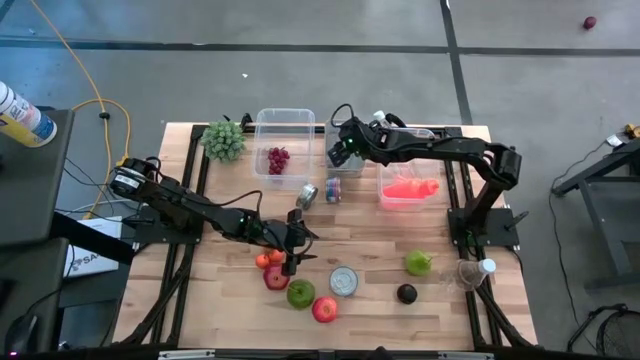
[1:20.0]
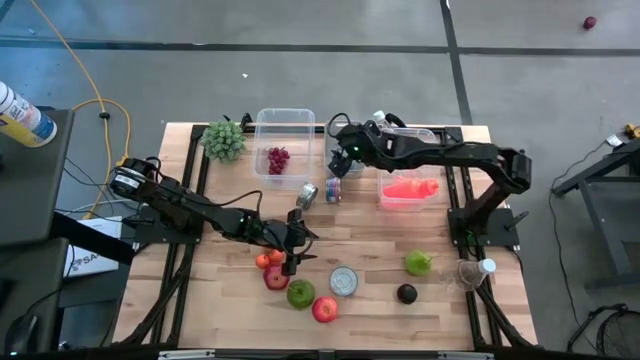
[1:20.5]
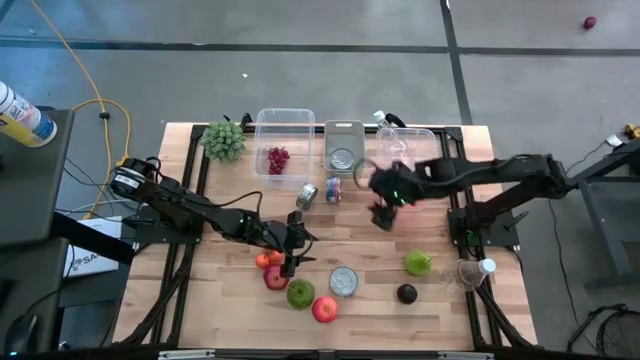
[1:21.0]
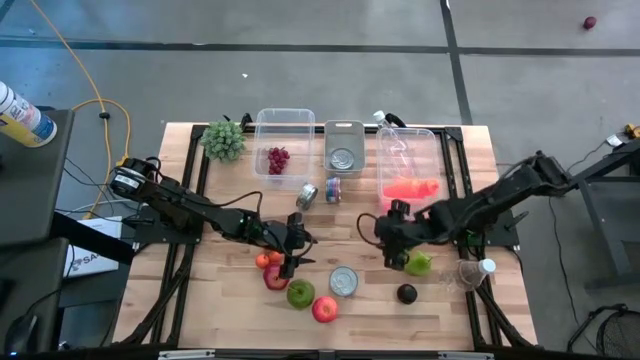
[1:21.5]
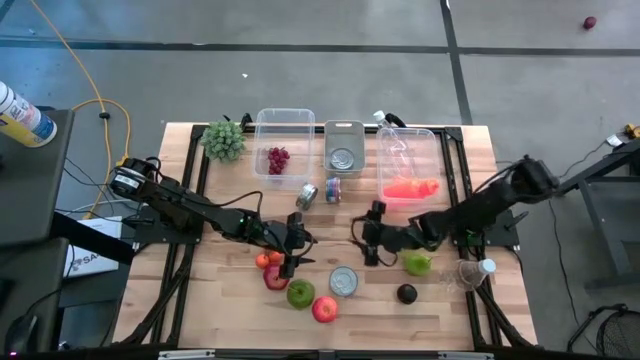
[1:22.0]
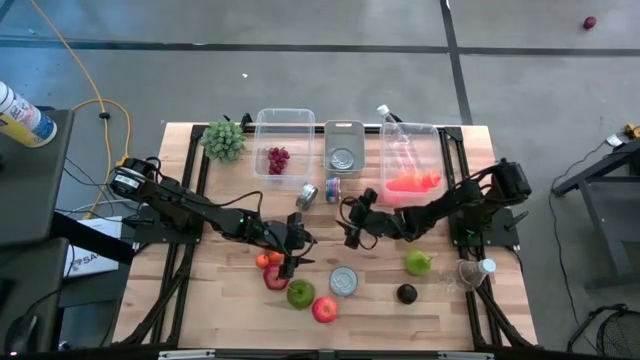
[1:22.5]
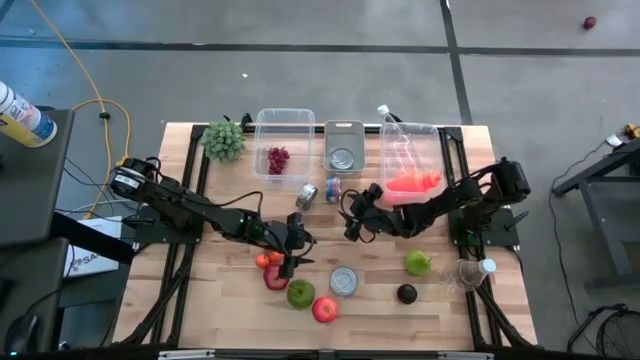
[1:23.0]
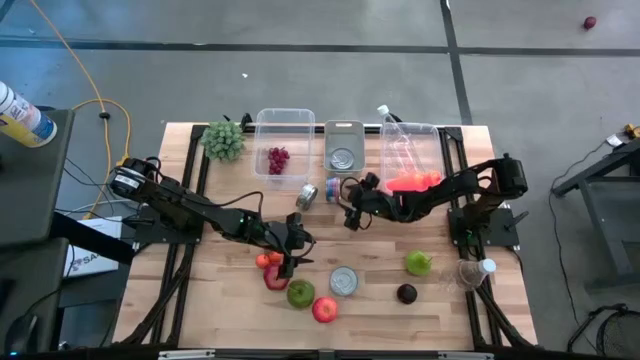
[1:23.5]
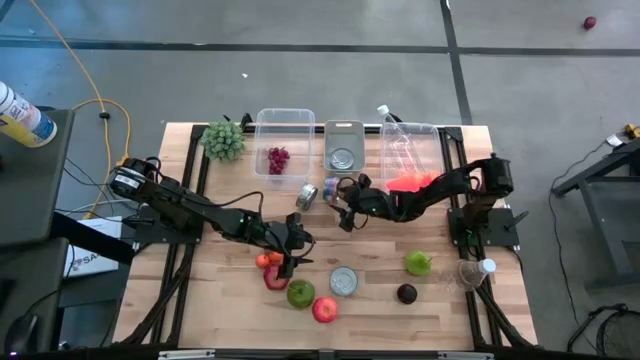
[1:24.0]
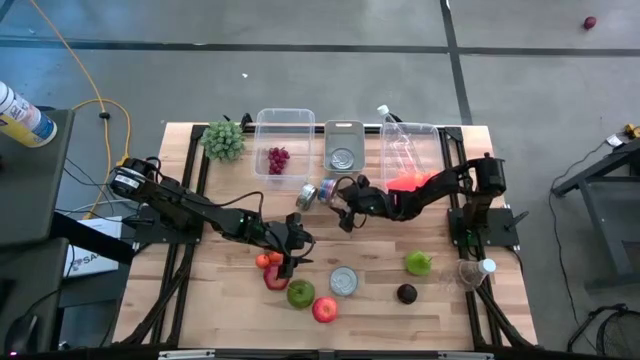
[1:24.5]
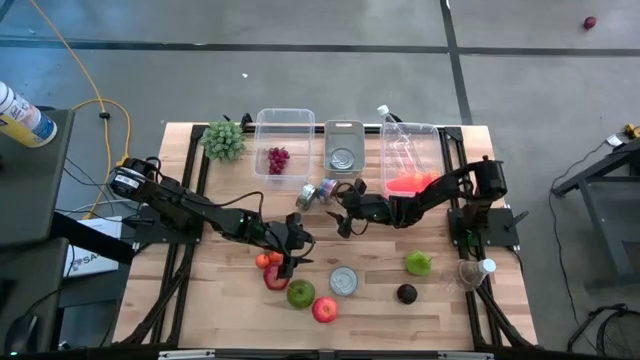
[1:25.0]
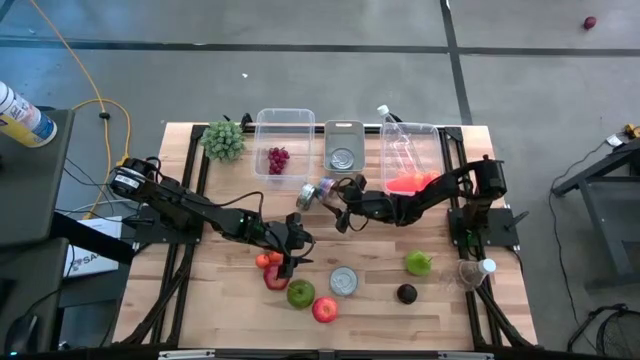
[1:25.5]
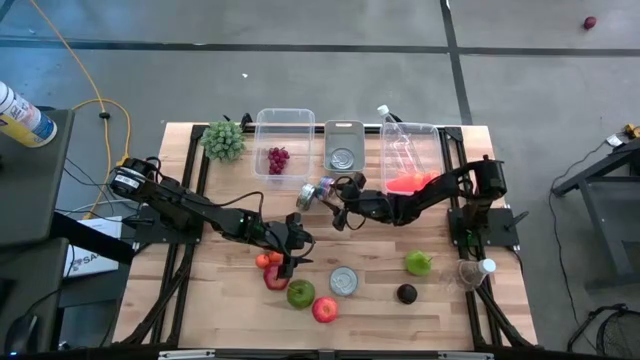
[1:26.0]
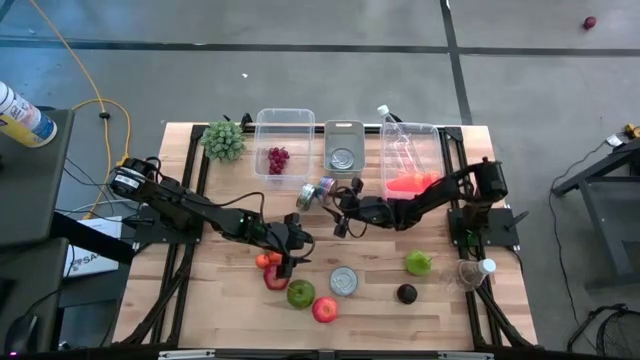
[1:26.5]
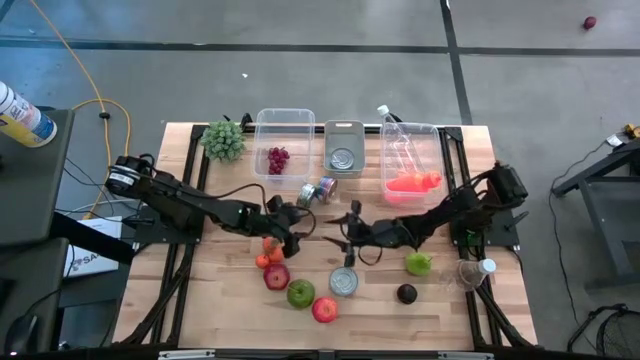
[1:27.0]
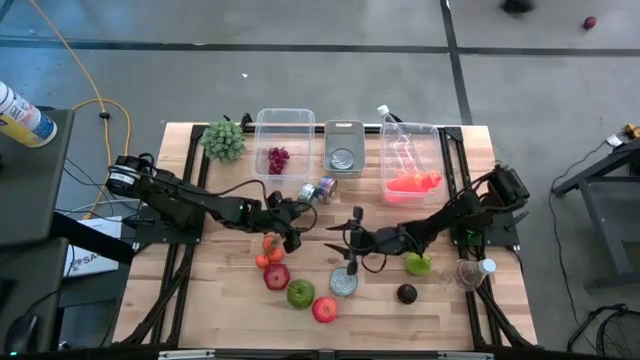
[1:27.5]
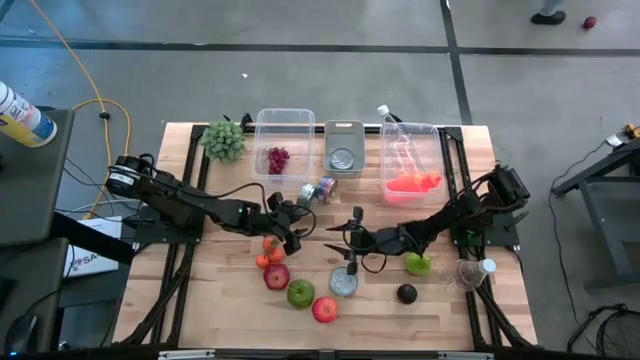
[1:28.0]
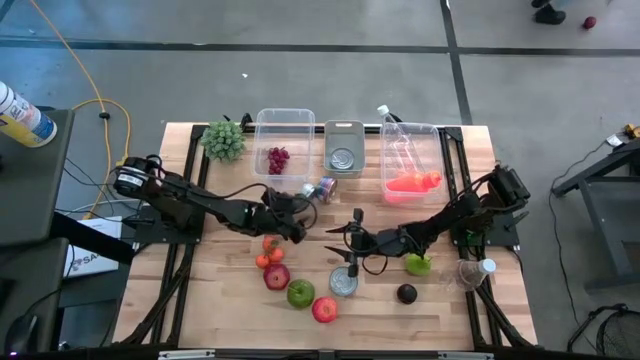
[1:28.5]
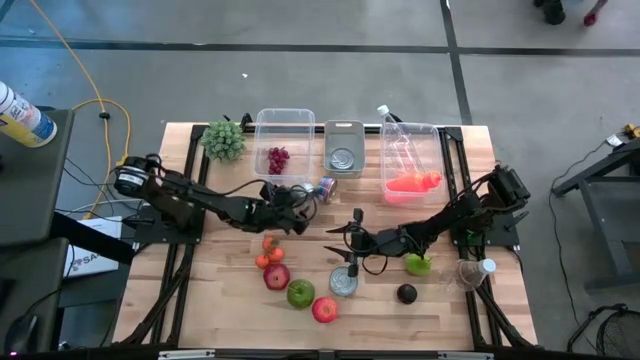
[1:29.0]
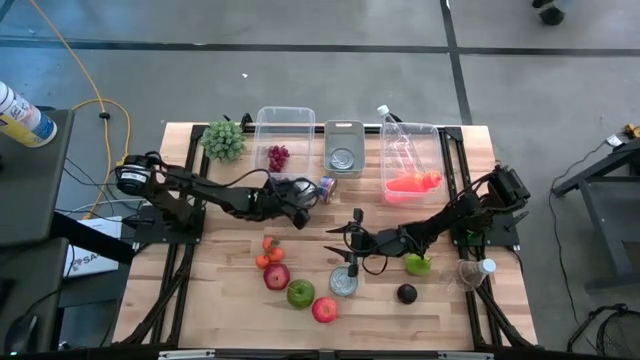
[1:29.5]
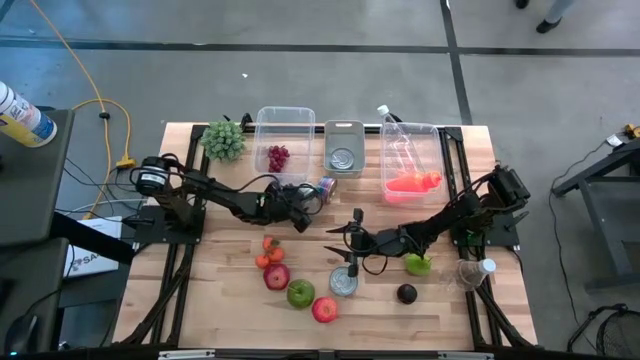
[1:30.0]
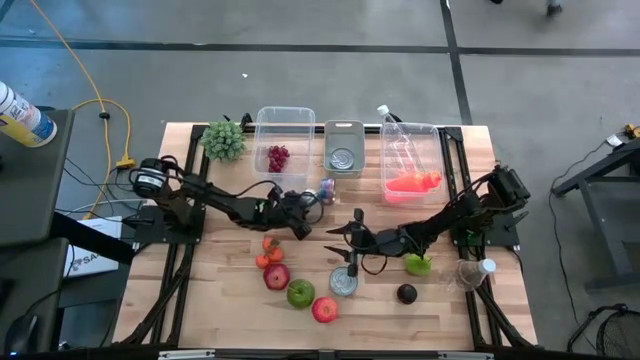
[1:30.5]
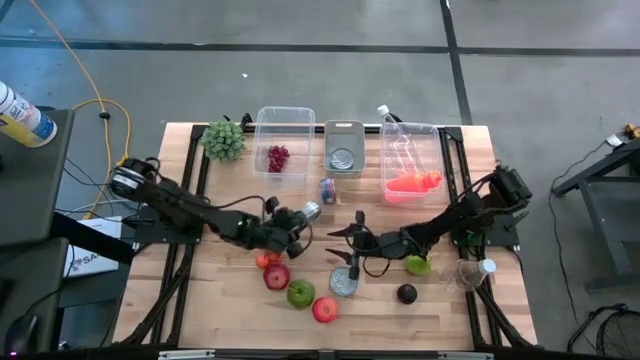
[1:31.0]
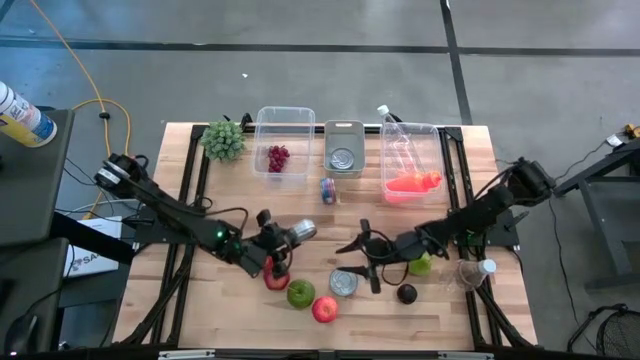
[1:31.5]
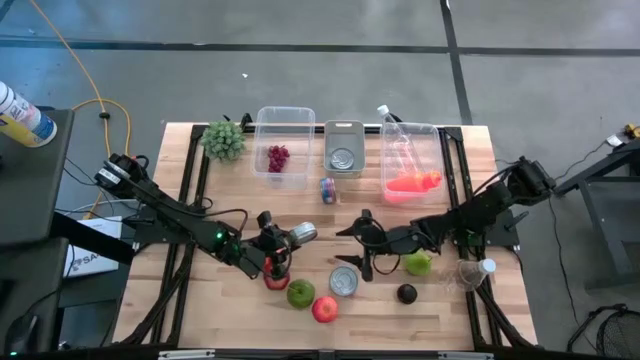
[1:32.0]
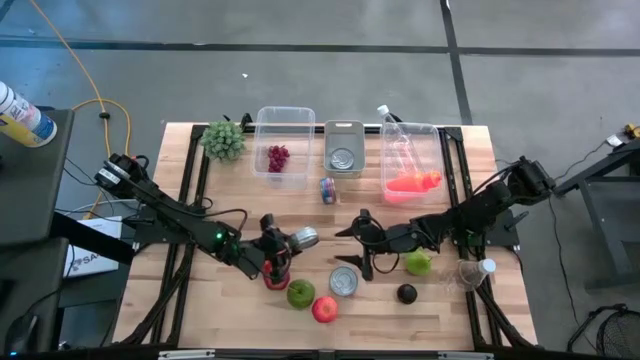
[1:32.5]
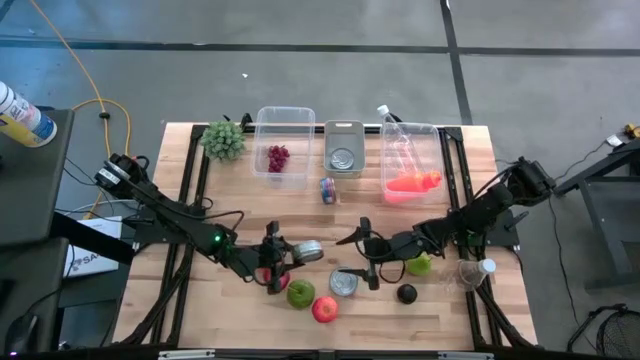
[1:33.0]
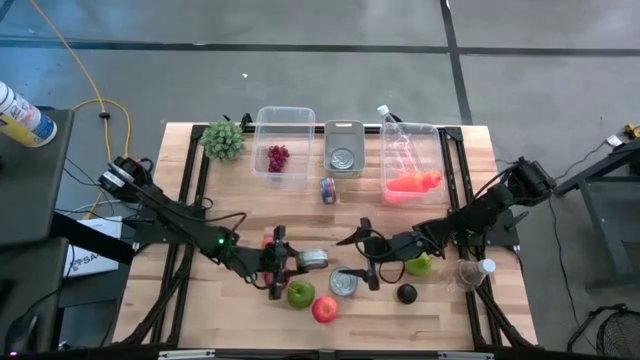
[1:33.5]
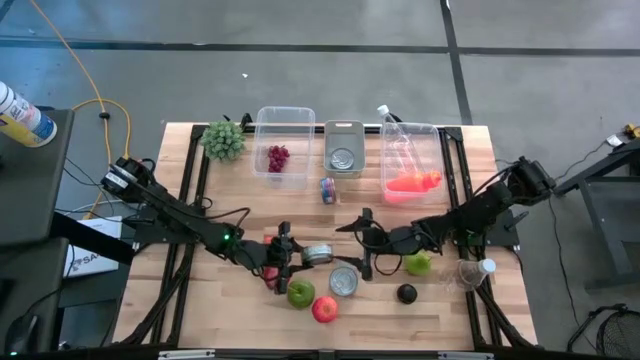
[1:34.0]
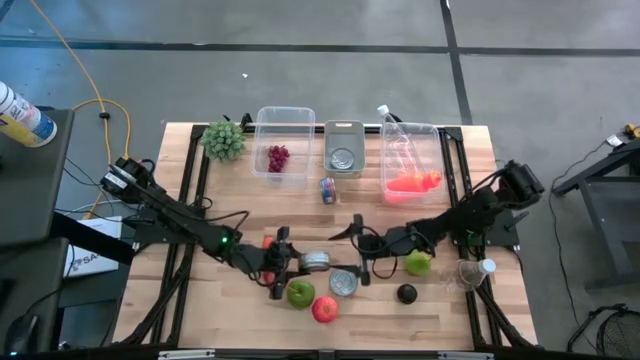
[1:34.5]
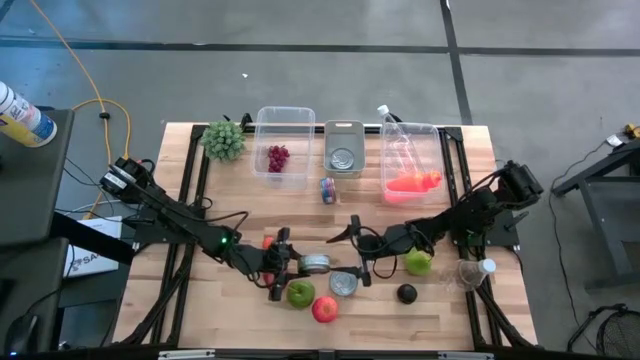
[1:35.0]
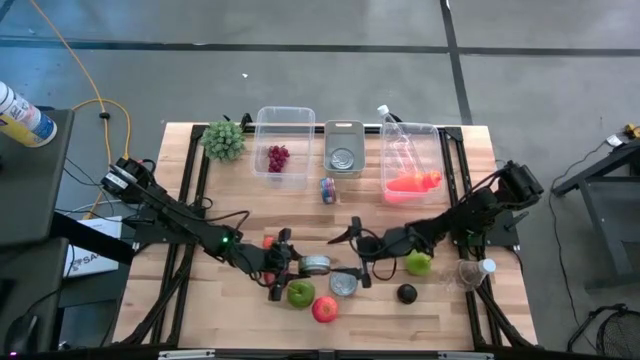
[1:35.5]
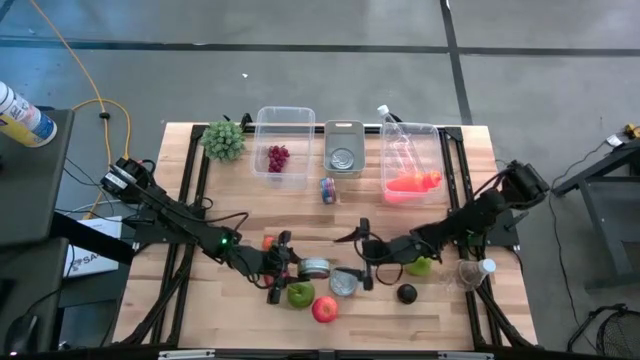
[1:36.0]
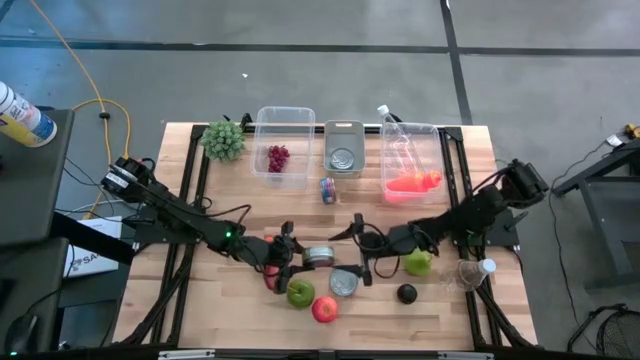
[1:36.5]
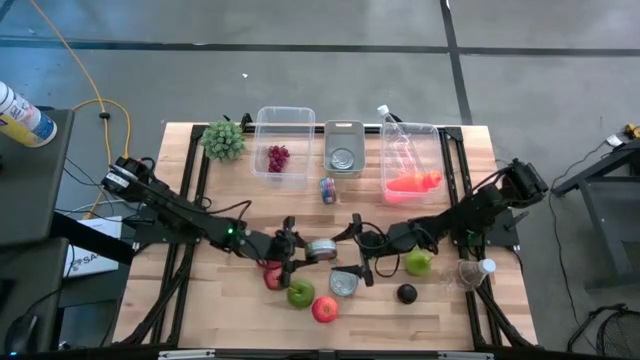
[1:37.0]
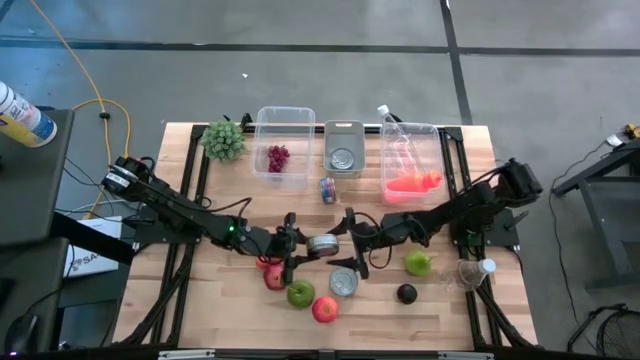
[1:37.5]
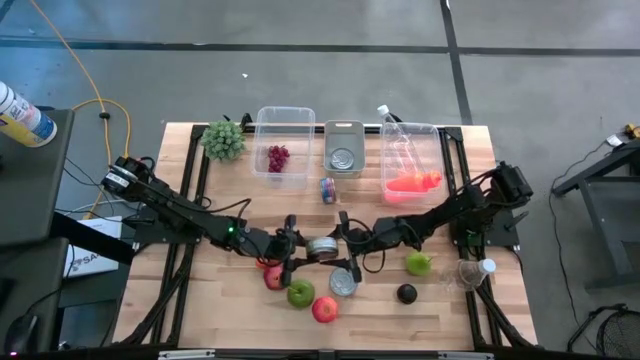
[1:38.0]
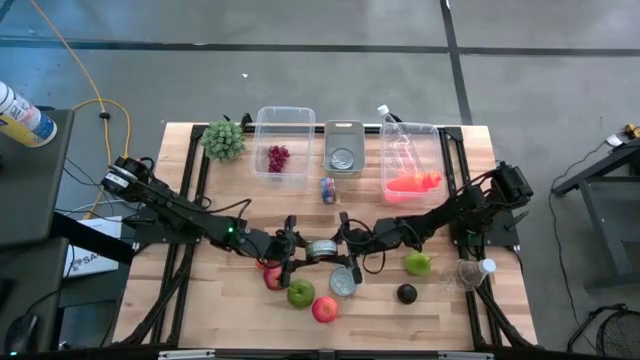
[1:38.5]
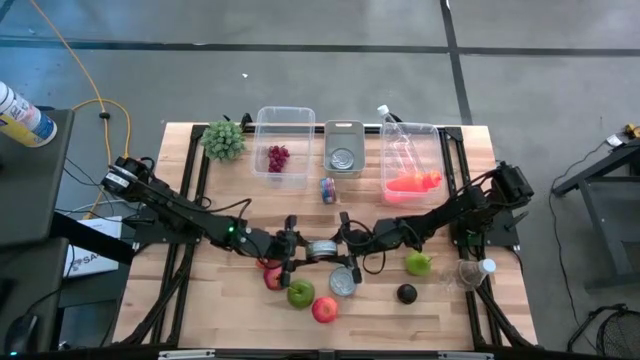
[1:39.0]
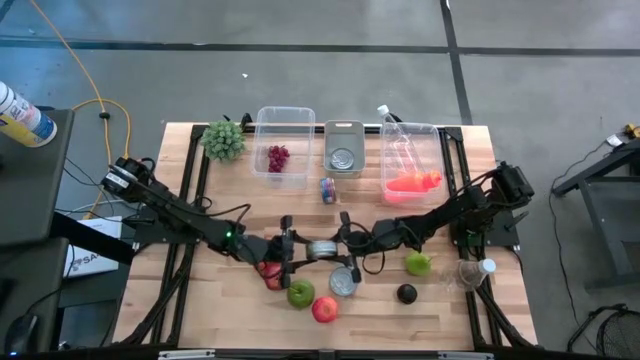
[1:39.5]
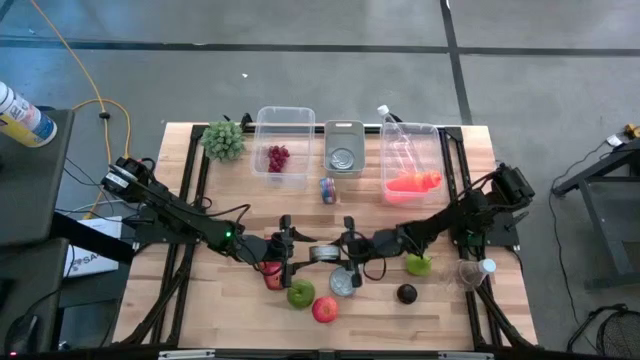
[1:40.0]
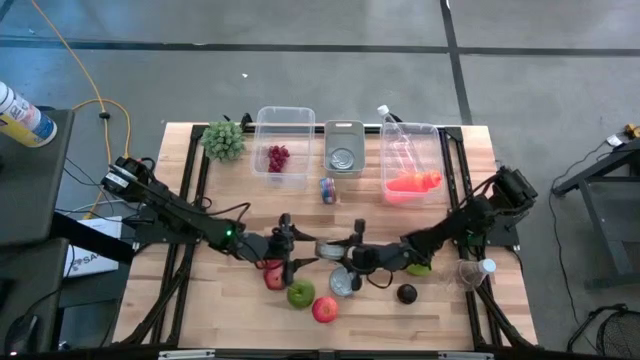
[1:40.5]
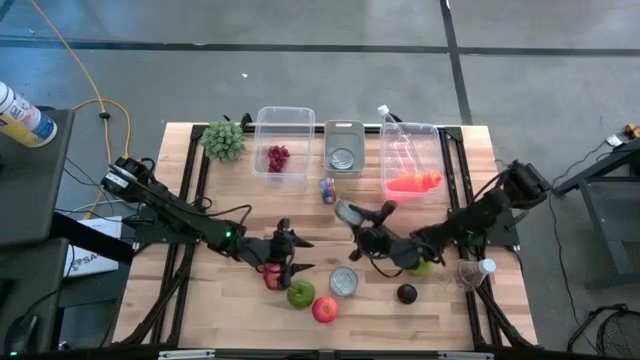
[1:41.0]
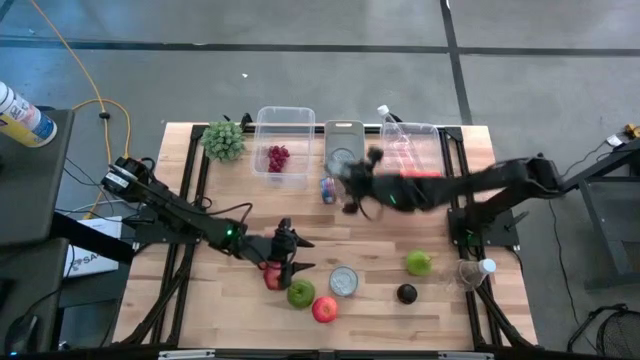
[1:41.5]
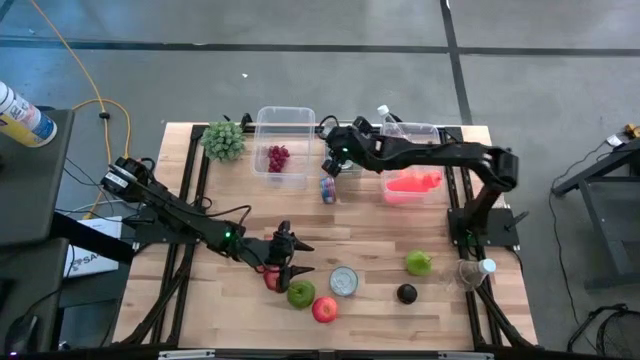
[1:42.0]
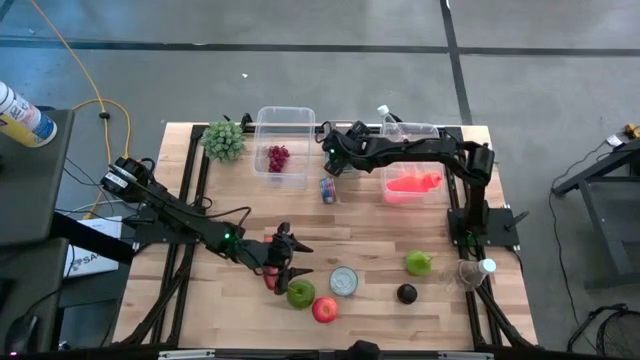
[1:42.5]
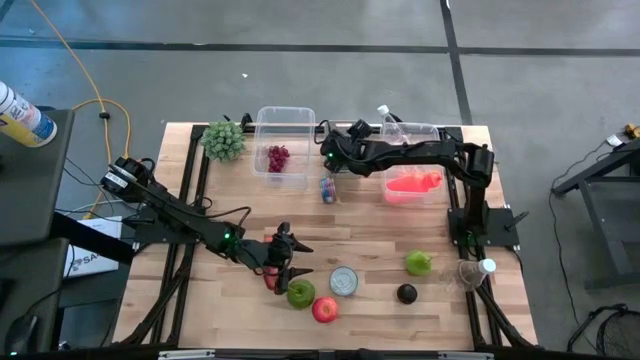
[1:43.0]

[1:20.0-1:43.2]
Task: Pick & Place Food Item
Put the green tuna can into the white bin
